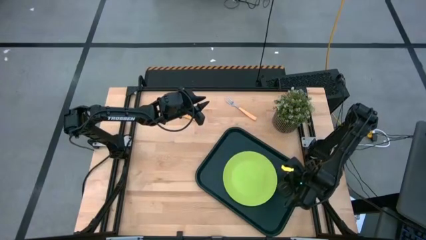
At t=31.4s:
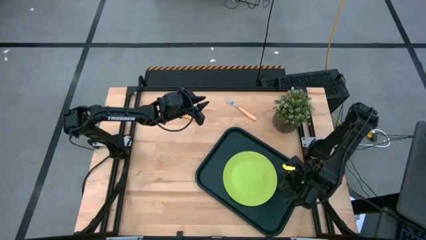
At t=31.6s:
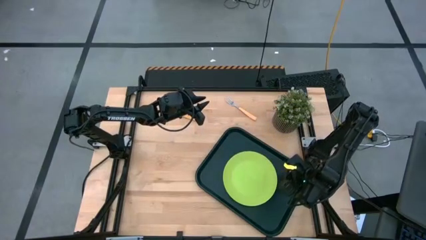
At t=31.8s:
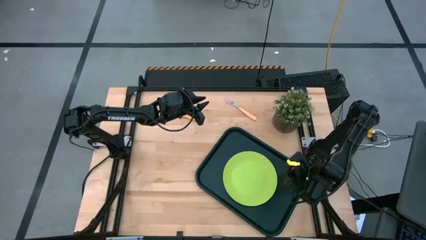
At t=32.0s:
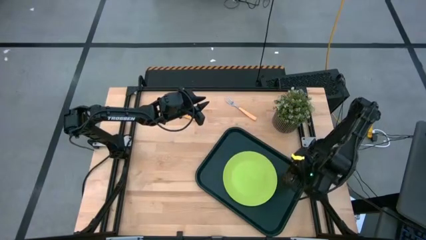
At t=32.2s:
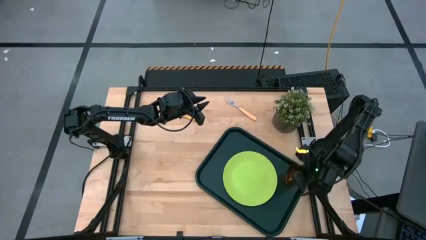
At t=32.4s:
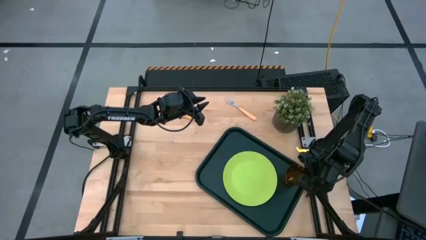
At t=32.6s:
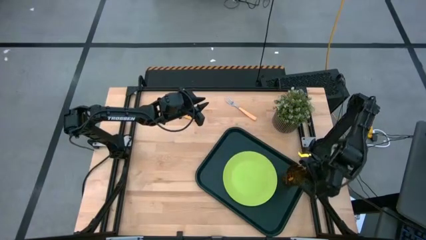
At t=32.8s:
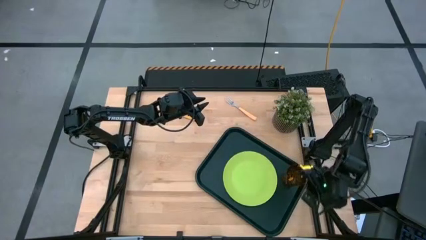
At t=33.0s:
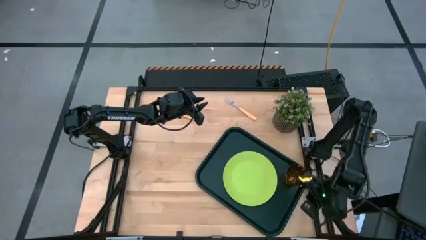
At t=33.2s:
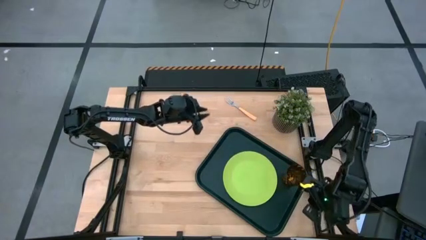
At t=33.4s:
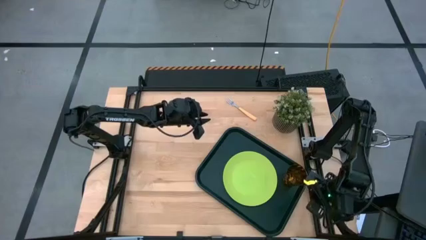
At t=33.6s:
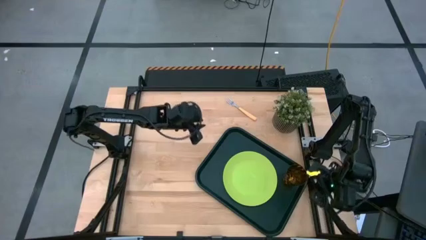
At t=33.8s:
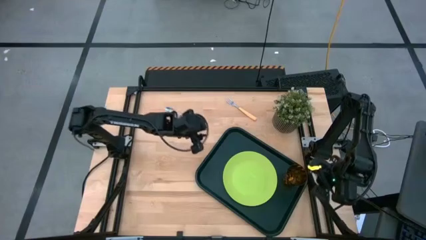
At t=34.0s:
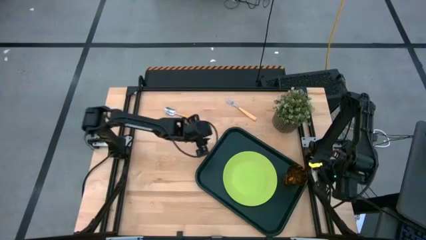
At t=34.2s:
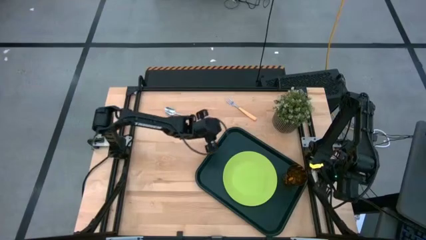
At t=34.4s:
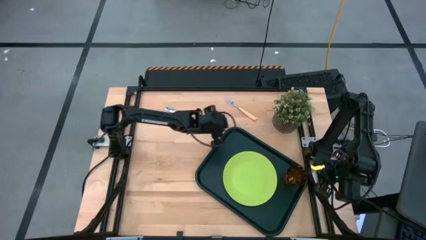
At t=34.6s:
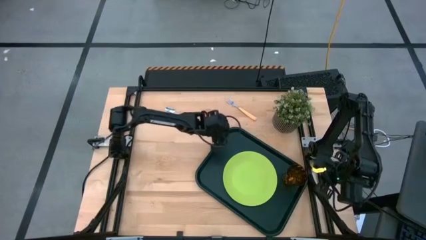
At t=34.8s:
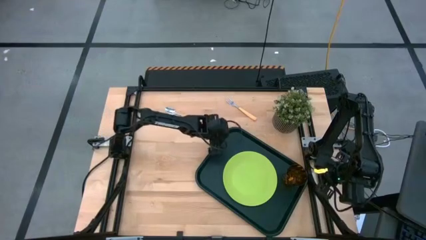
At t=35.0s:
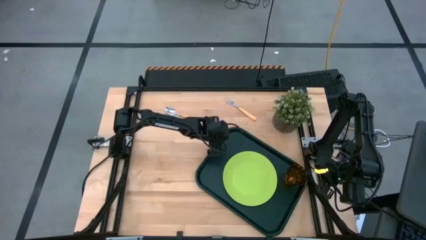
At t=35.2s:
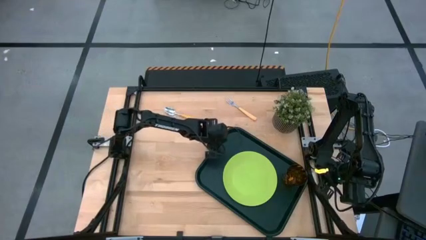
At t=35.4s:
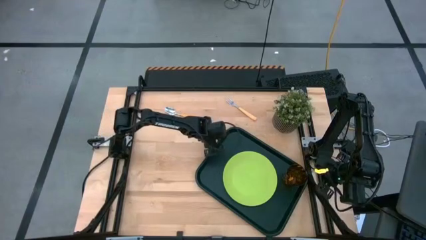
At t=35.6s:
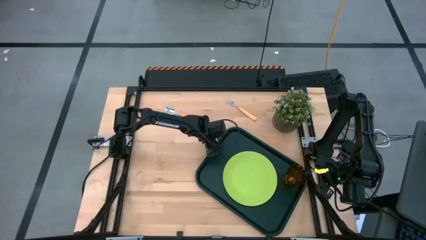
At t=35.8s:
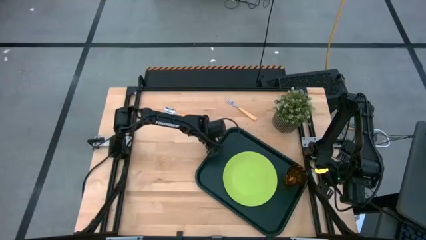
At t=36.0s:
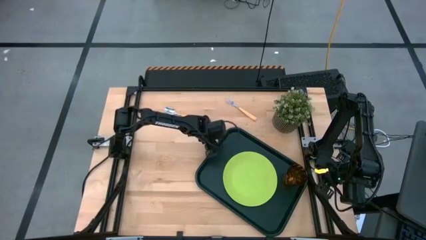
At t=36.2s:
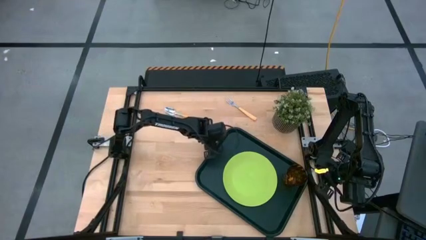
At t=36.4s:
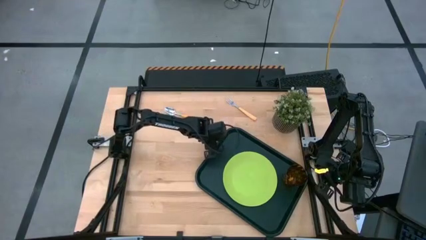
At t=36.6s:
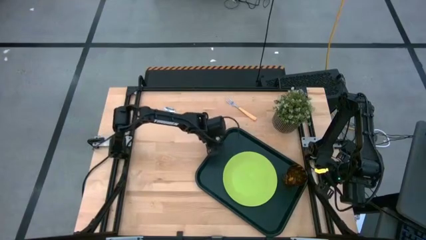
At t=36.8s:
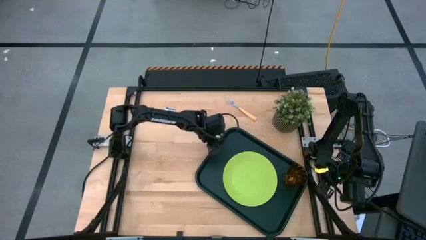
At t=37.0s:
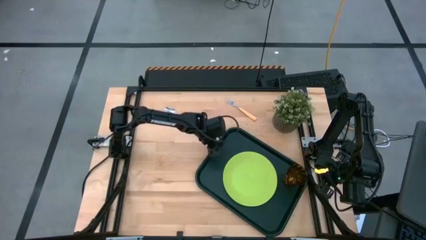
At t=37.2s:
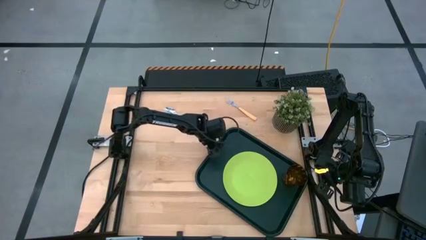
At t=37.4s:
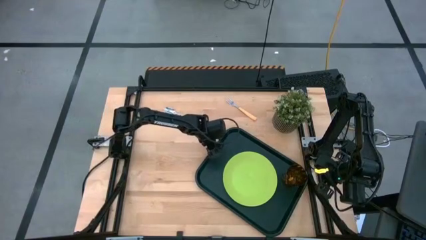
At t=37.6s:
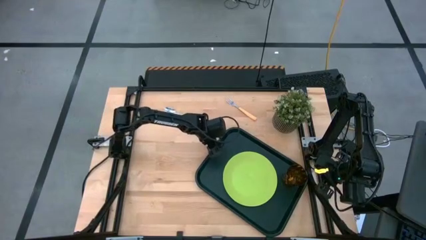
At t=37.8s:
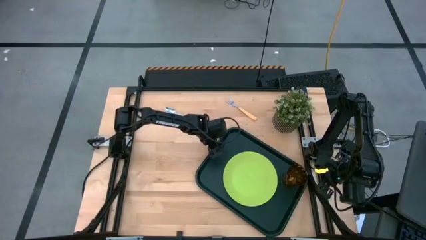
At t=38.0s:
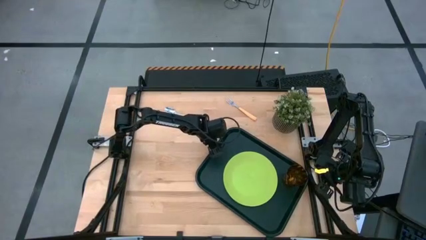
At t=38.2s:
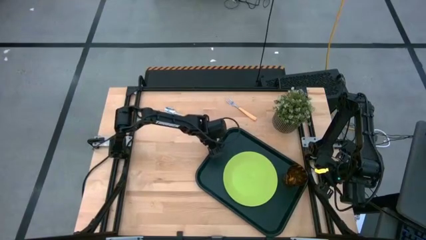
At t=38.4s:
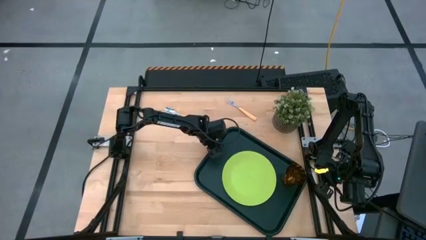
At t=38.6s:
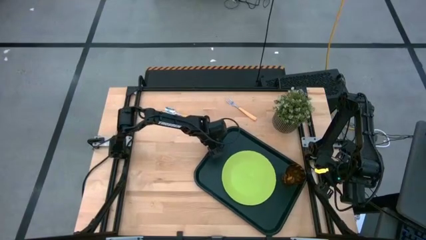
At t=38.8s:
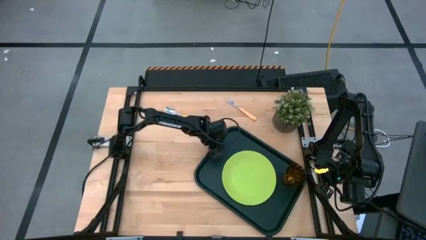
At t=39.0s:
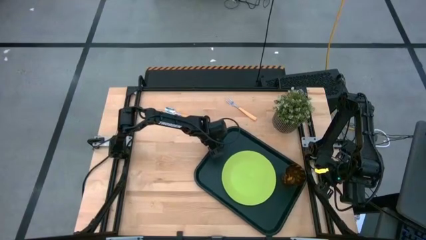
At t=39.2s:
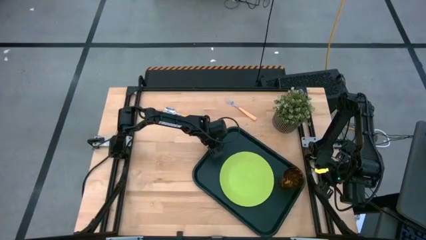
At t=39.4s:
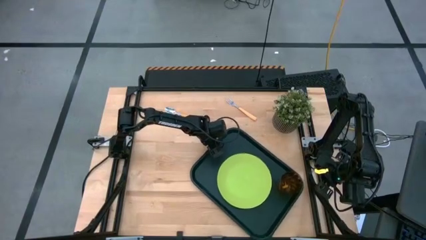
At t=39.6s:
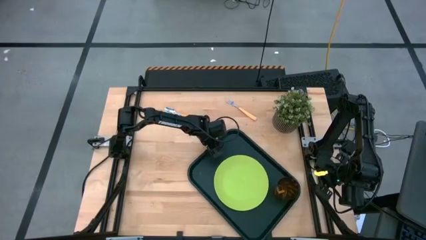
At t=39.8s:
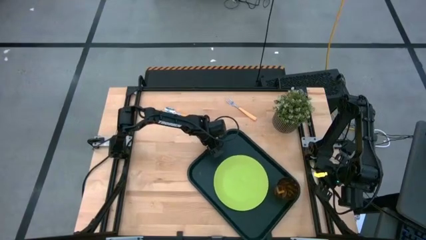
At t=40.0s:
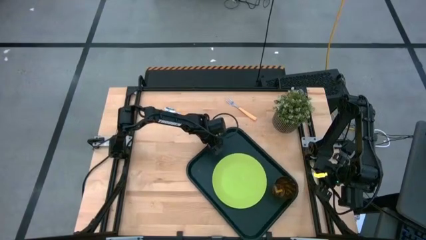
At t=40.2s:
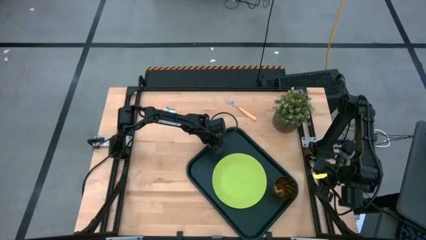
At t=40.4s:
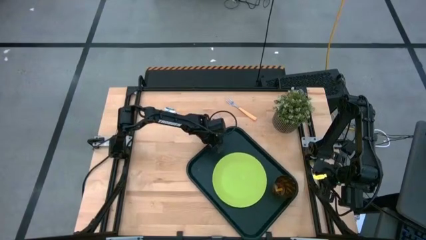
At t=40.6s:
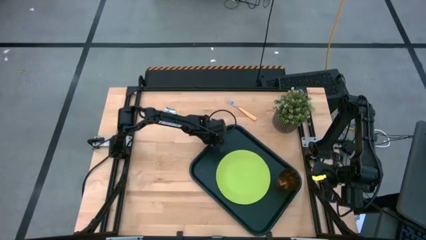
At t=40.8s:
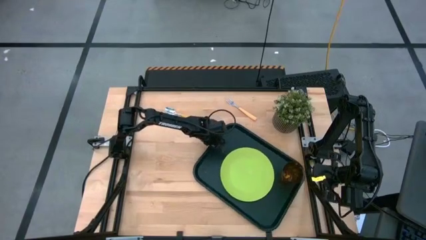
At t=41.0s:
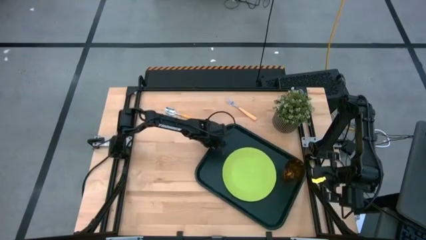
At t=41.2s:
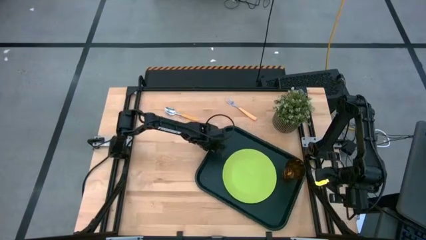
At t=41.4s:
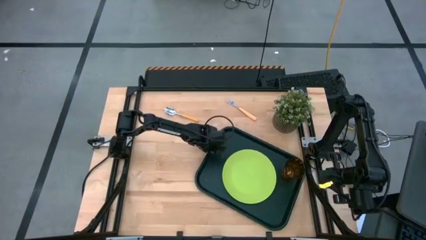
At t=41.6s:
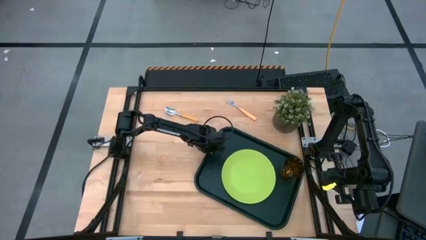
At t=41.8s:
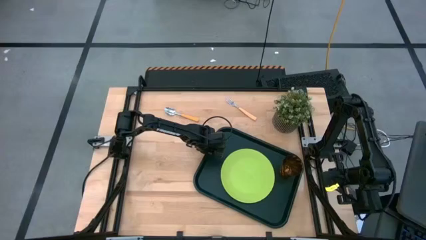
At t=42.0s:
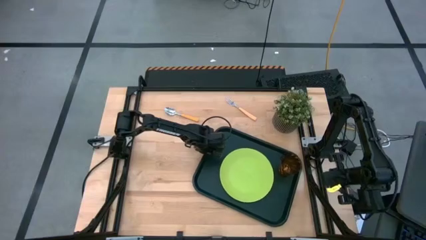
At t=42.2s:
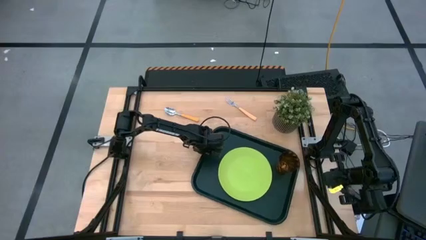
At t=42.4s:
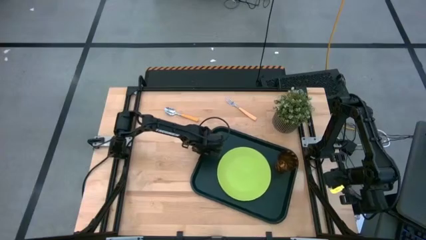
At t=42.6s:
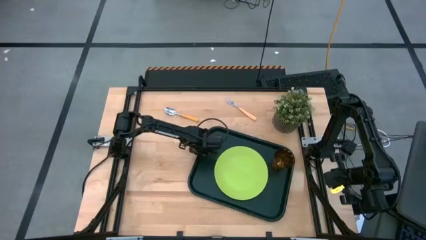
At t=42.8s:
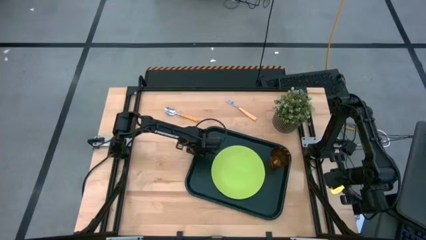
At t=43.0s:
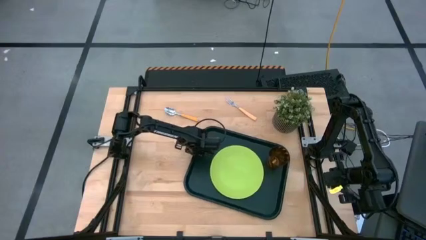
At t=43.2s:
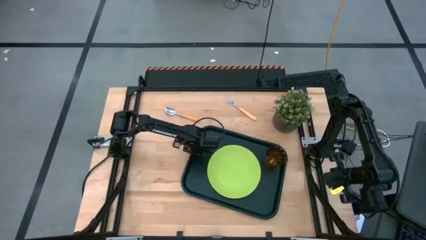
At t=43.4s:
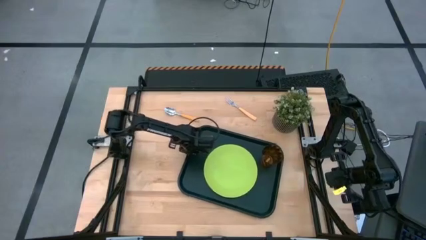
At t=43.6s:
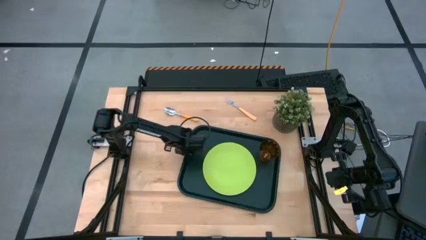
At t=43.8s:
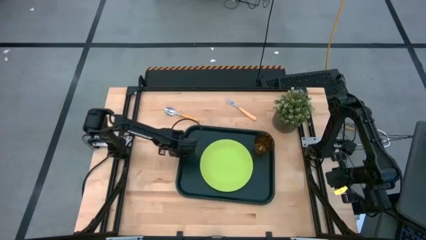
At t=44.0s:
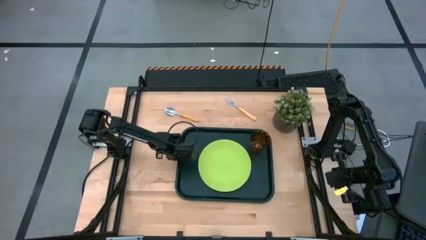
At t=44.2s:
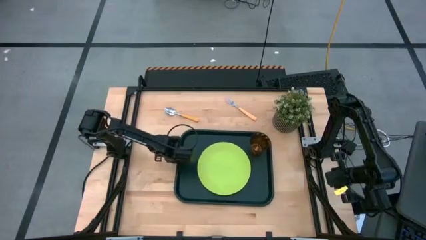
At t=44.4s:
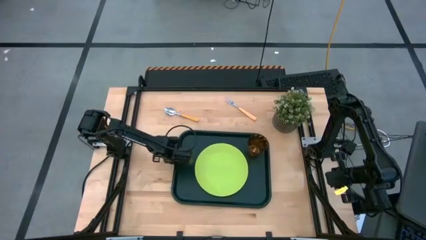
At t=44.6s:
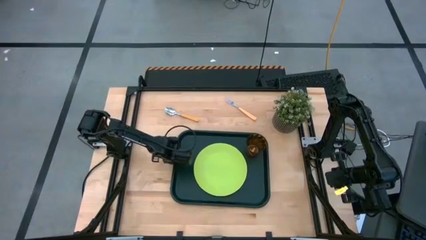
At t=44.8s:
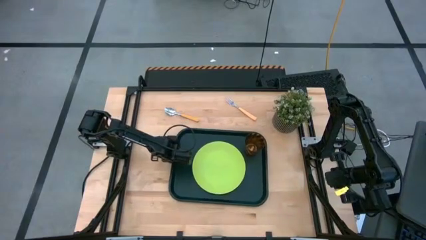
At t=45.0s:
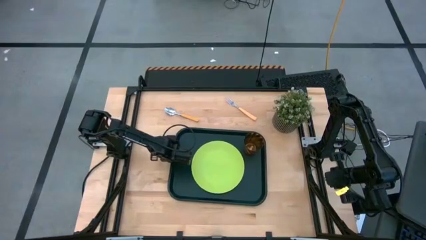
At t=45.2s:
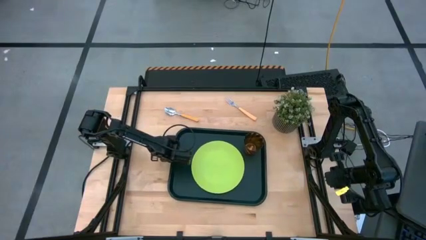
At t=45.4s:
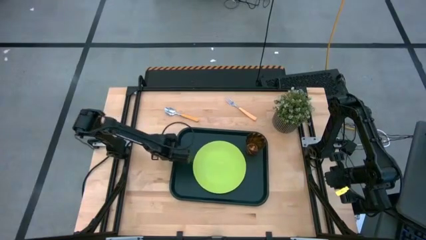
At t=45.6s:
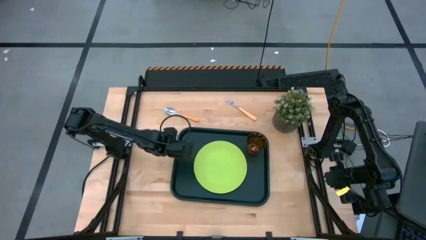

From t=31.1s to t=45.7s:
Task: Pick and place plate/cup/fork/spoon on tray
Adjust the black tray on the table
